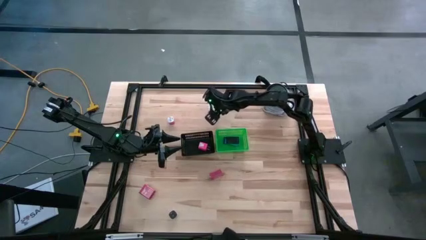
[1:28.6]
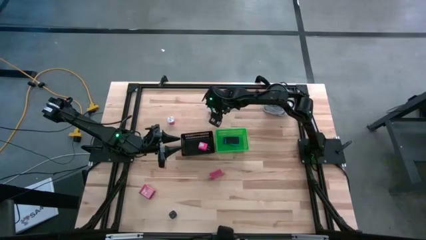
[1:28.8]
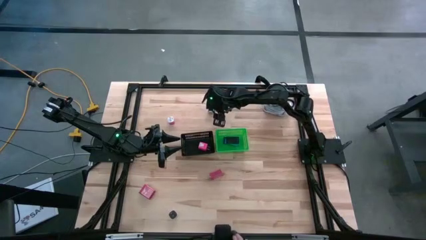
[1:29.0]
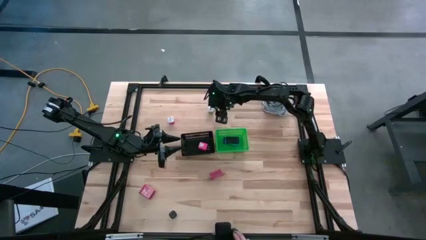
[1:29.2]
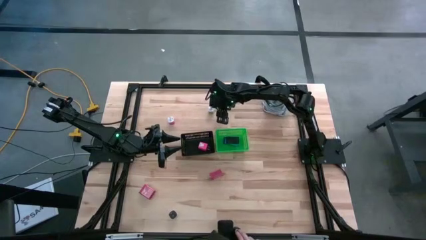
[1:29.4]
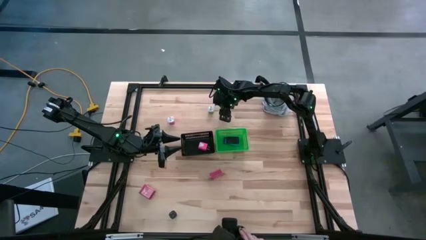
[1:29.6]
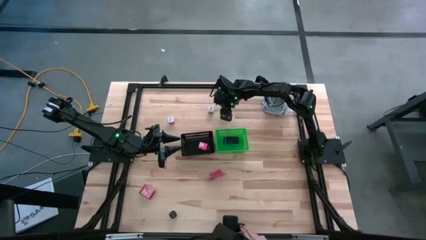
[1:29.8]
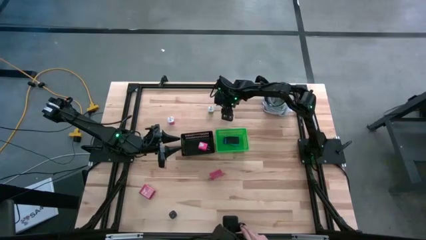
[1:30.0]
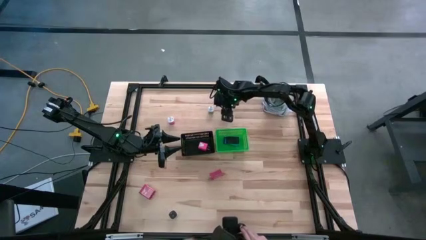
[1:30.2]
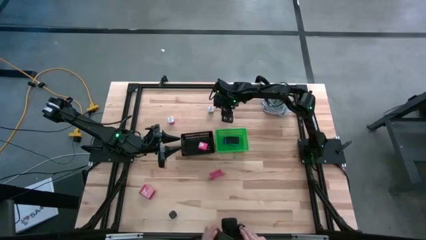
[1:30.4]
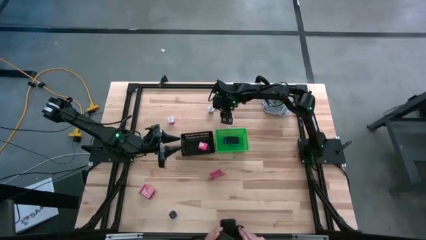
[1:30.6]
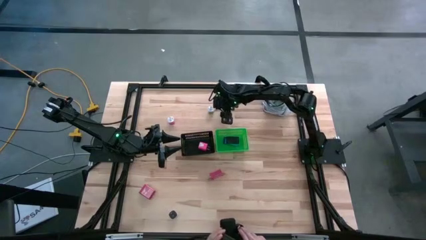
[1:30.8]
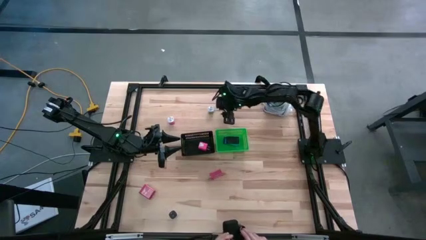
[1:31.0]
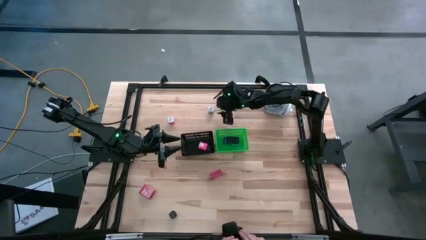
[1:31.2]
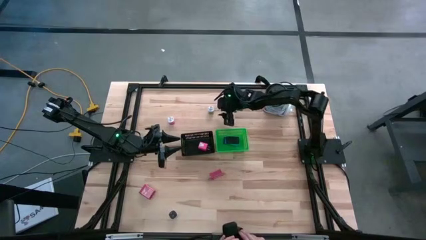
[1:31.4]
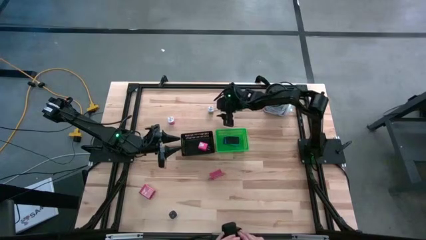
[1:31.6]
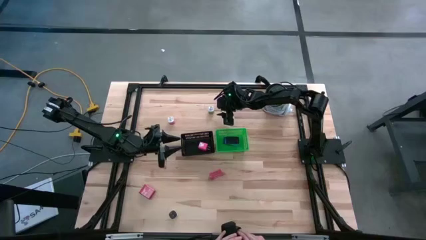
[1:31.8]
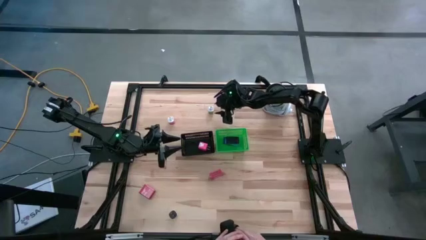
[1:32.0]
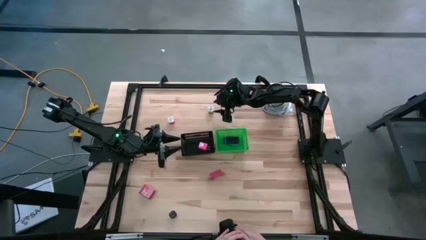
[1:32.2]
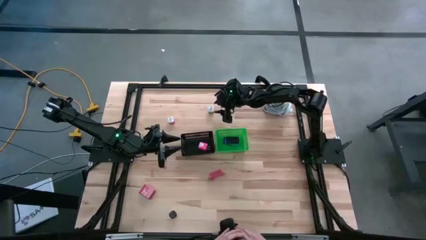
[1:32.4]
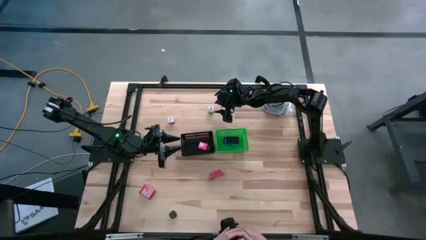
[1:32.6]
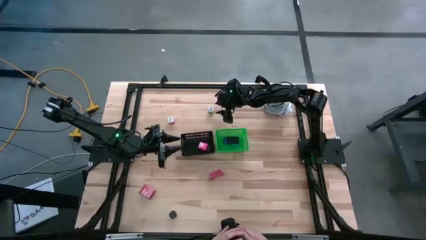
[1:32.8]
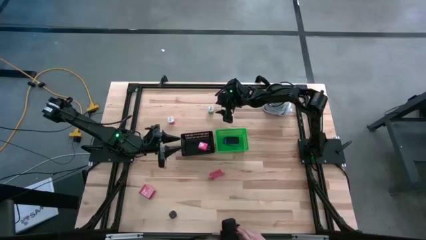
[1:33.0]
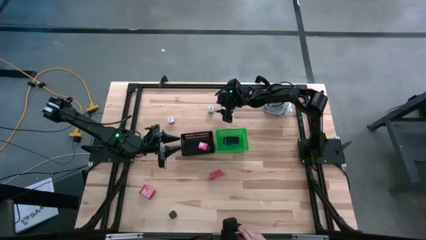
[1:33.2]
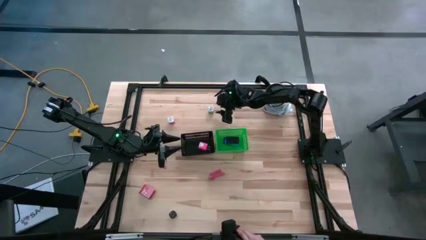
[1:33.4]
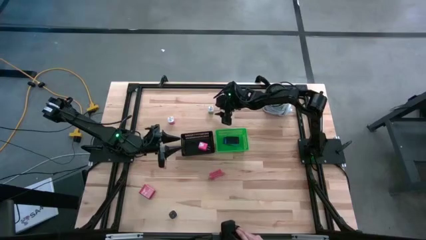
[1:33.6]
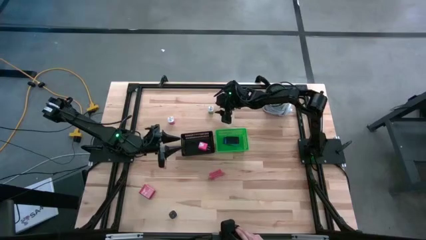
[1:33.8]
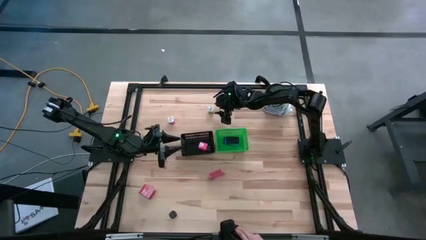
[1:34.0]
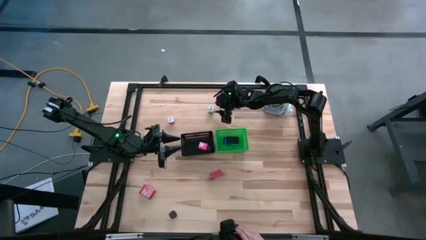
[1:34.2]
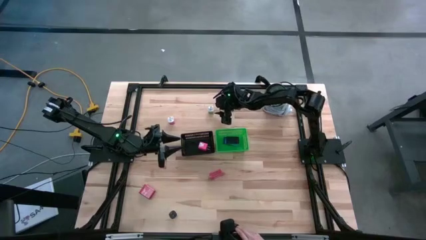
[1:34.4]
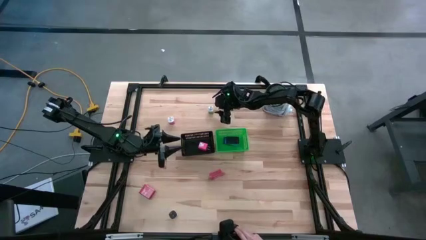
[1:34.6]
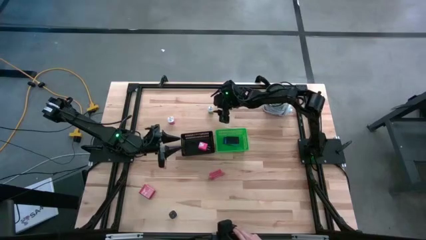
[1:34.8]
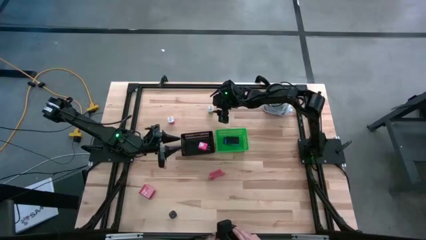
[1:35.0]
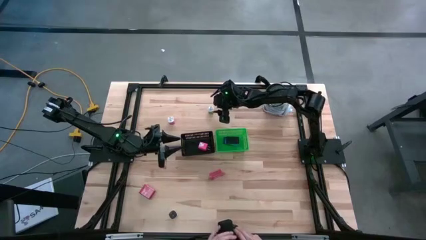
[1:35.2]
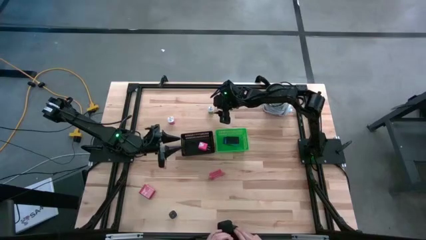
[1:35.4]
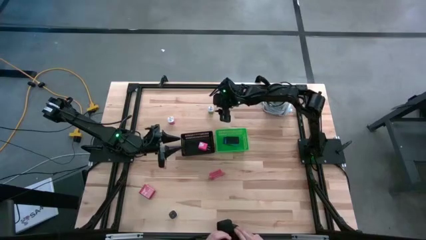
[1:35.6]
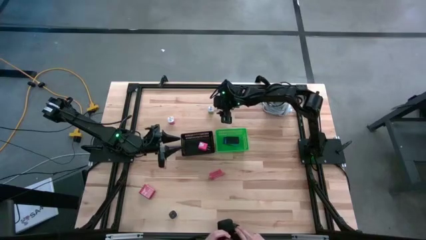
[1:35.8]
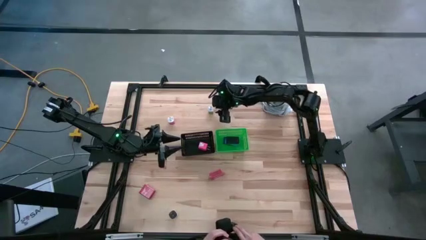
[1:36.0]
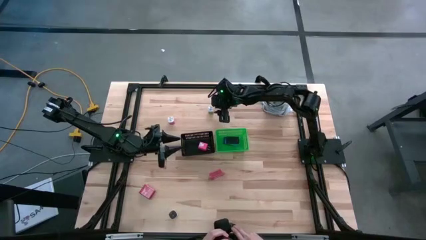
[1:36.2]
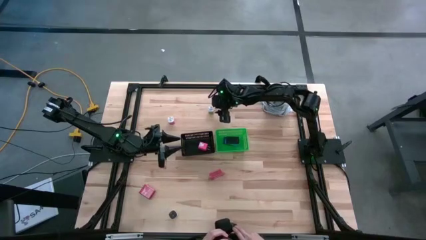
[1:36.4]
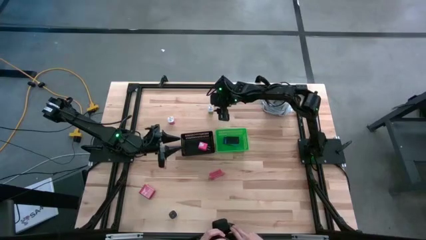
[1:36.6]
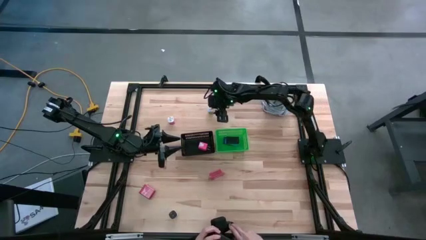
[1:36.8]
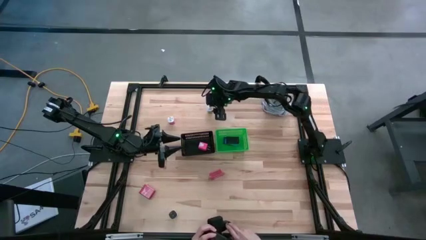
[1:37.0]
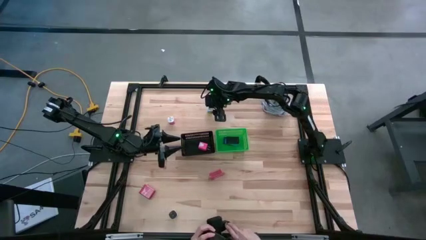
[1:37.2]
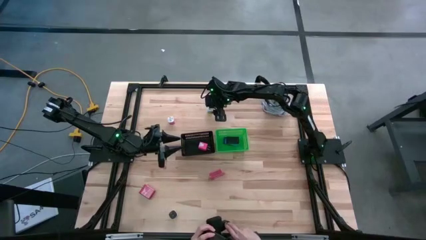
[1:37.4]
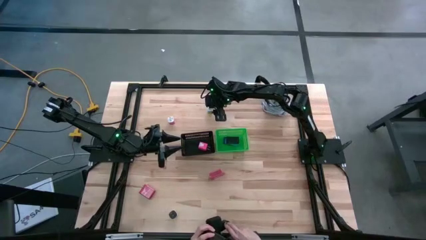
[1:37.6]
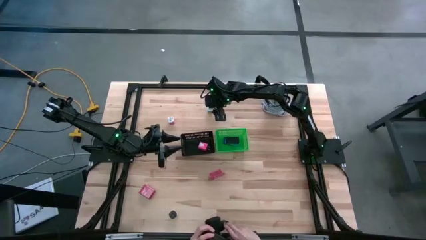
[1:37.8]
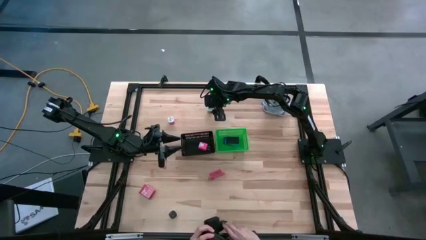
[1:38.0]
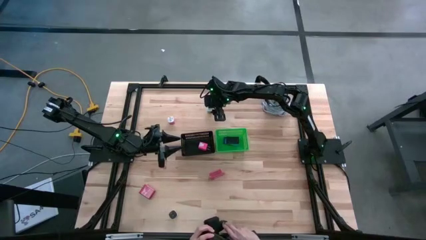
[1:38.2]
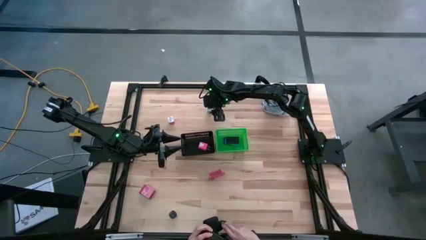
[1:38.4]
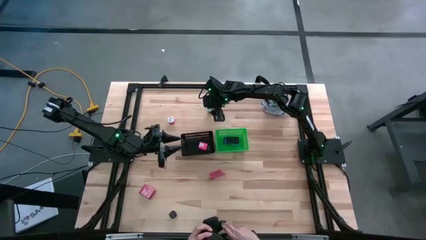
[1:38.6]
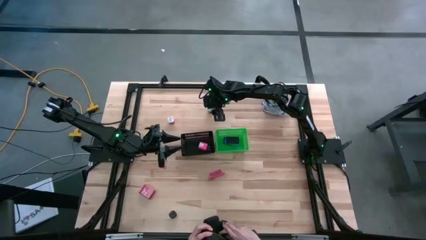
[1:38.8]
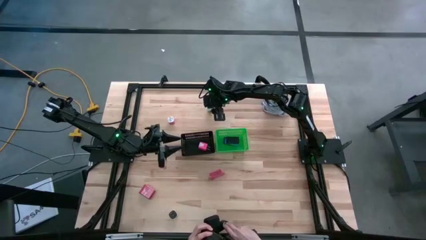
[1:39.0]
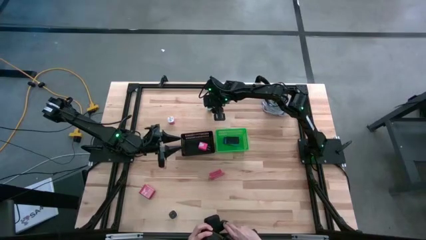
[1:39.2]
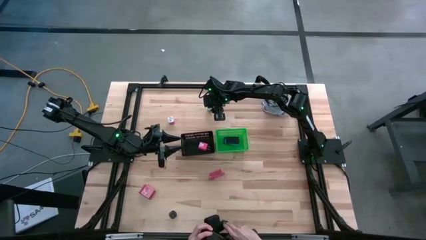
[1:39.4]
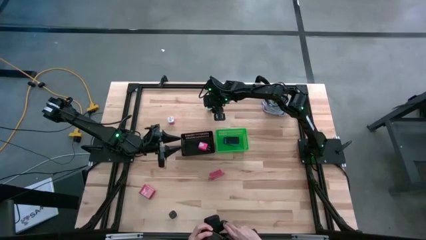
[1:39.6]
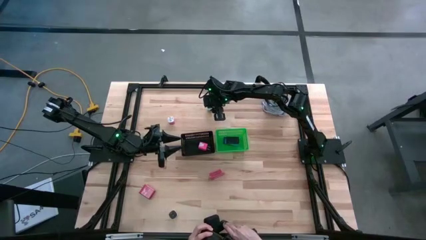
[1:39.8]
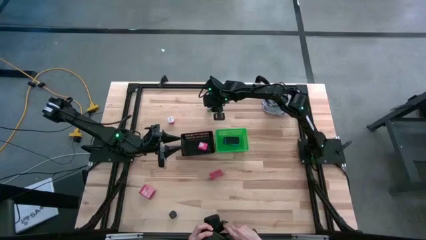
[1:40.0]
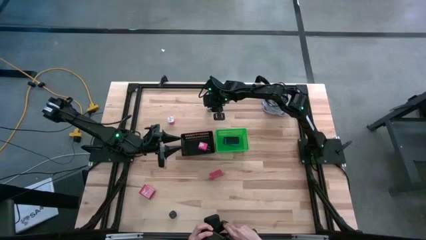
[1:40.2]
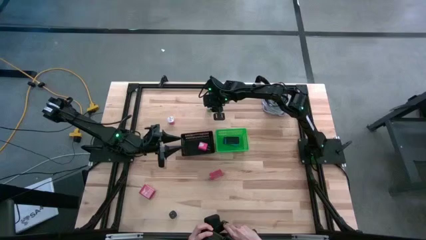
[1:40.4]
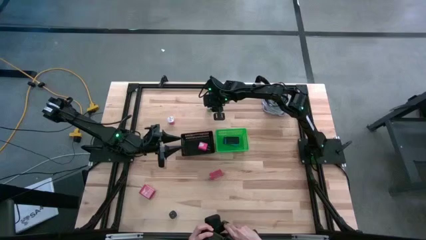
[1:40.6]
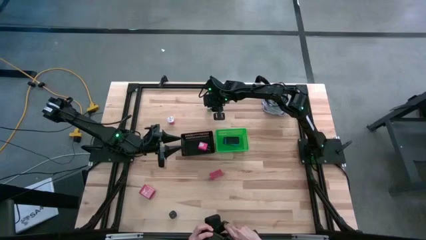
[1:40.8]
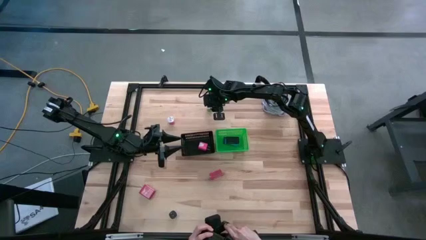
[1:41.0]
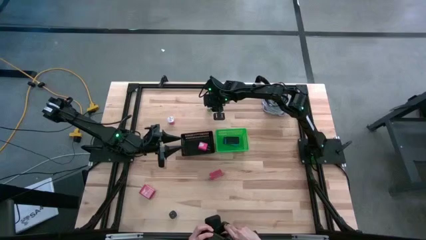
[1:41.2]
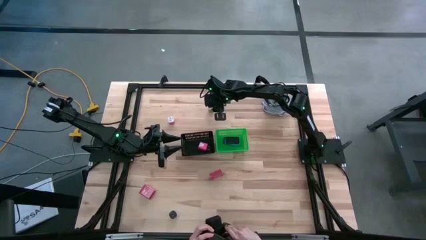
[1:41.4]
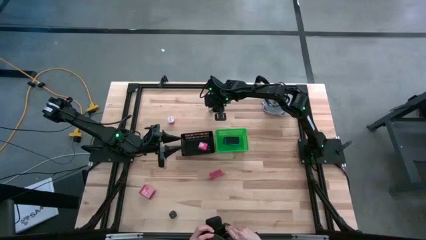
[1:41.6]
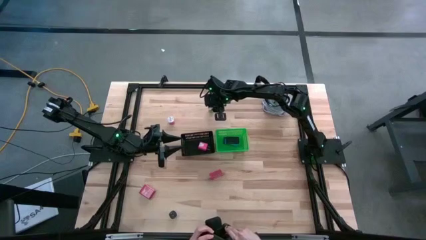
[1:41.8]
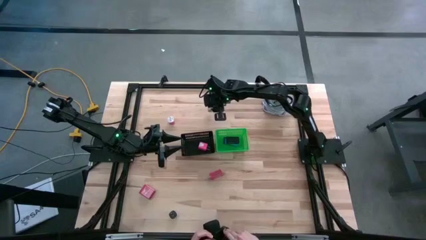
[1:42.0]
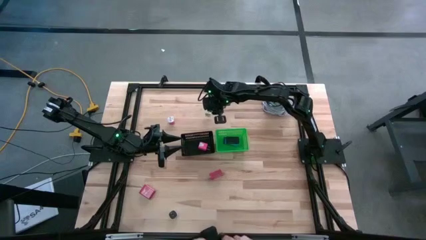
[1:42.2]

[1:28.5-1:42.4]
Task: Pick & Place Office items
Put the green charger adapter into the black bin

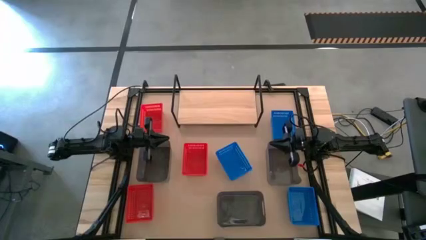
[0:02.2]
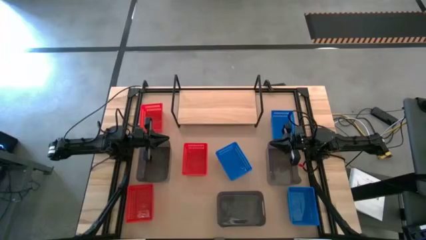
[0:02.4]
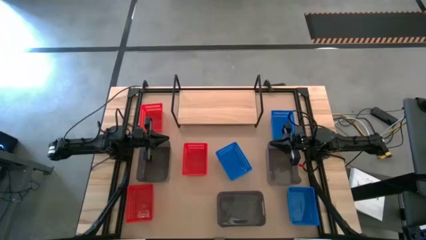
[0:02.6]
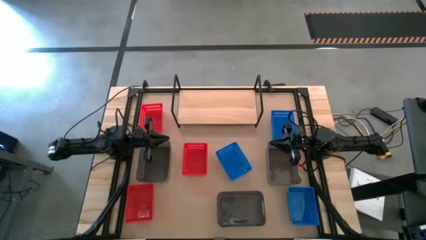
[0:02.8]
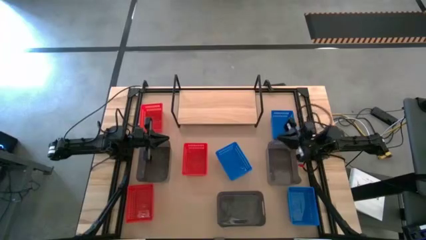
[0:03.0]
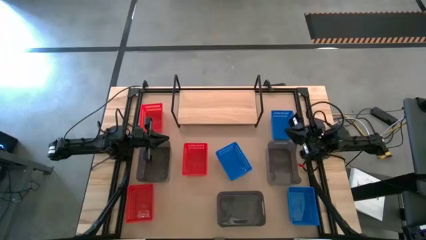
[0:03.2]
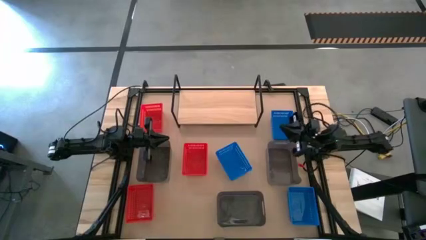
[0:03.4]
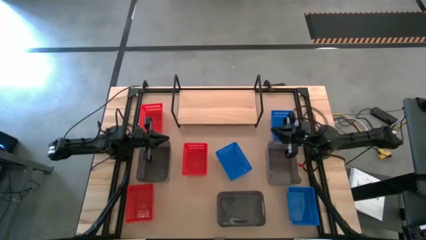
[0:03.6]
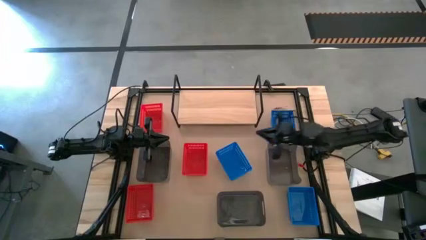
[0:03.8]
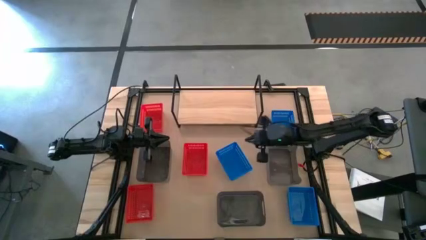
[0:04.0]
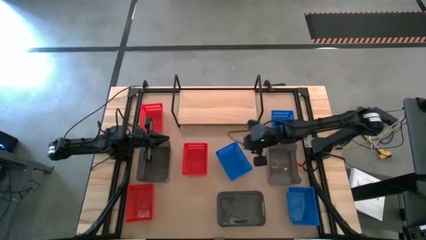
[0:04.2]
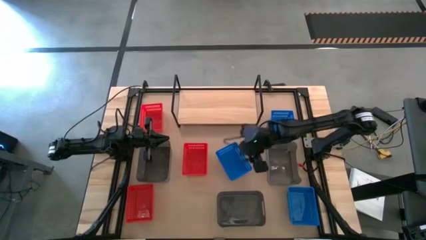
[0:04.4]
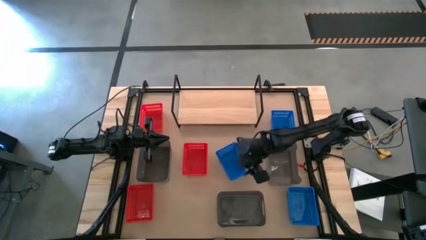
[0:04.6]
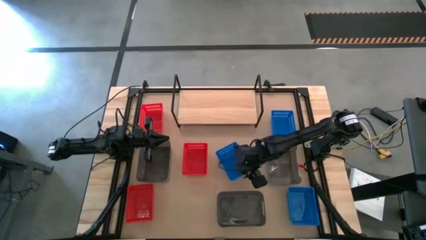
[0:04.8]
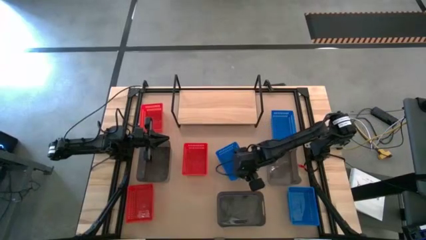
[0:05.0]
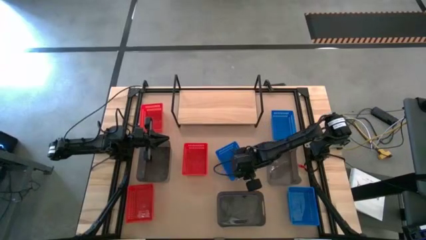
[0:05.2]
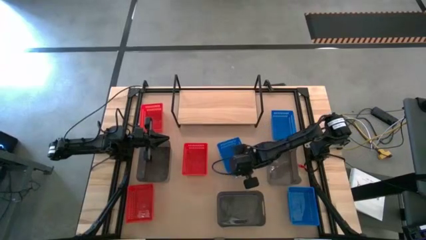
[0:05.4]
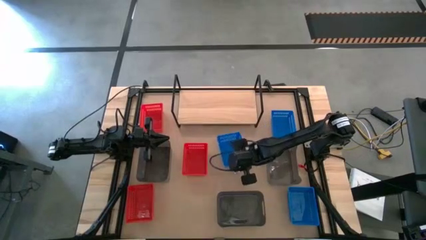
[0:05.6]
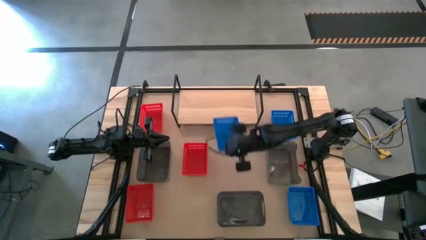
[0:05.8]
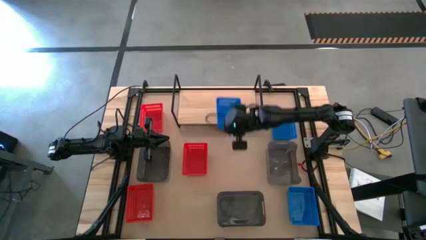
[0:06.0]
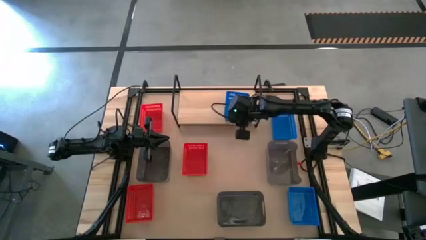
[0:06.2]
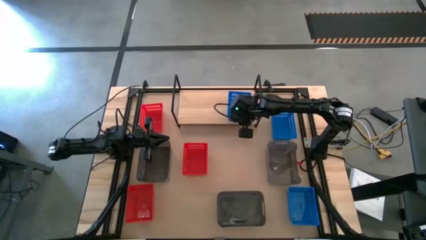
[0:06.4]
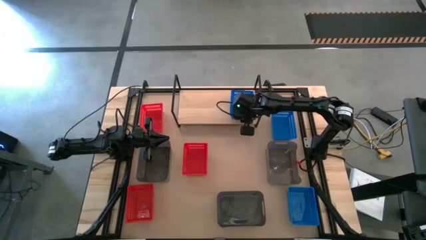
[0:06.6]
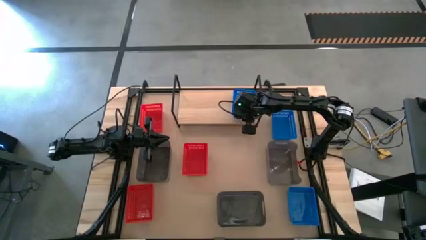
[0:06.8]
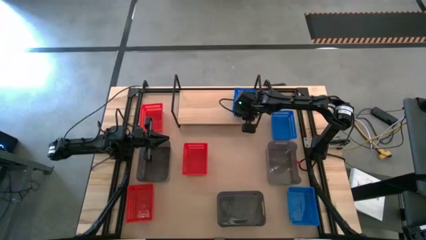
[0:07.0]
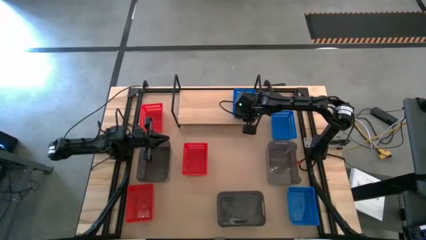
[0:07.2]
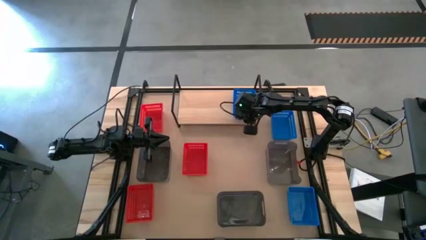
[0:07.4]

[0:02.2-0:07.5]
Task: Stack baskets on shelf by color
Put the middle left blue bin on the shelf
